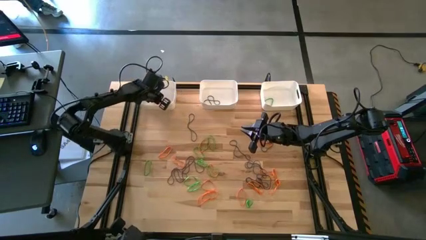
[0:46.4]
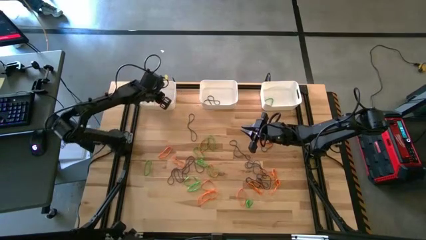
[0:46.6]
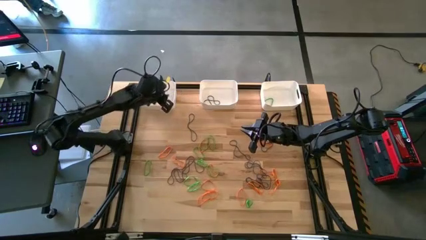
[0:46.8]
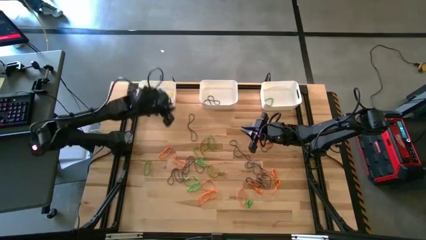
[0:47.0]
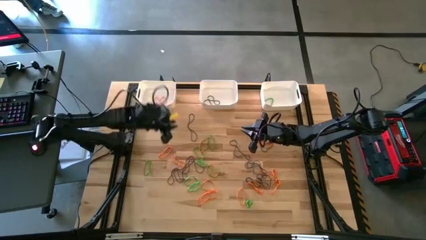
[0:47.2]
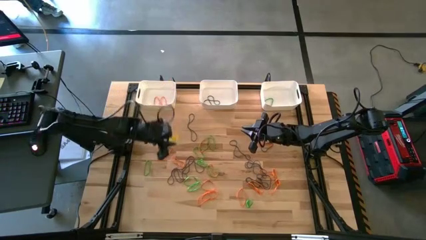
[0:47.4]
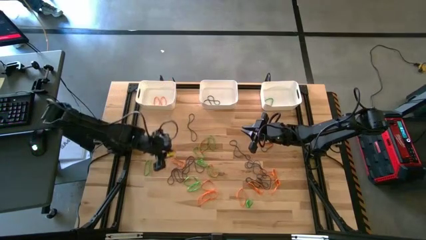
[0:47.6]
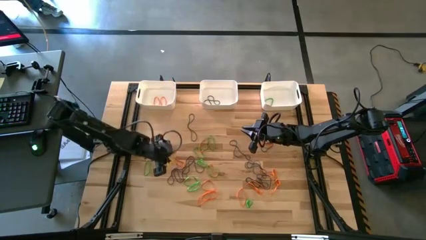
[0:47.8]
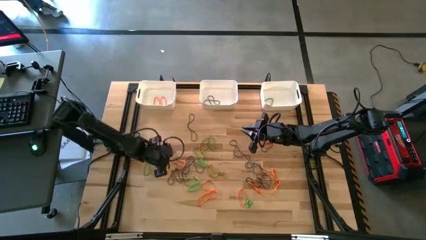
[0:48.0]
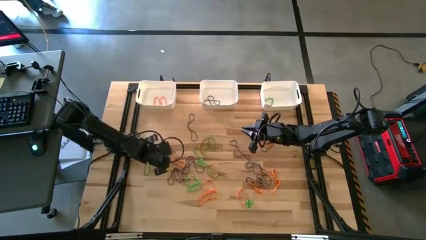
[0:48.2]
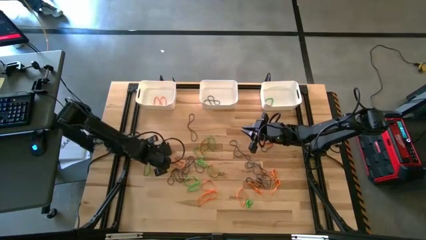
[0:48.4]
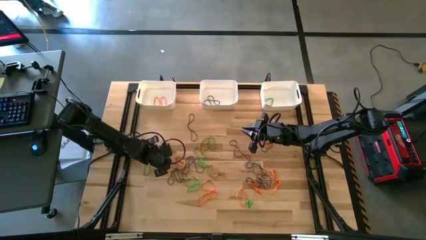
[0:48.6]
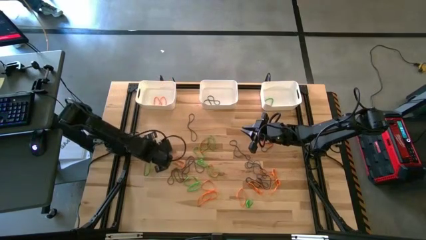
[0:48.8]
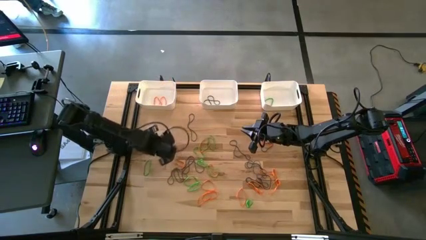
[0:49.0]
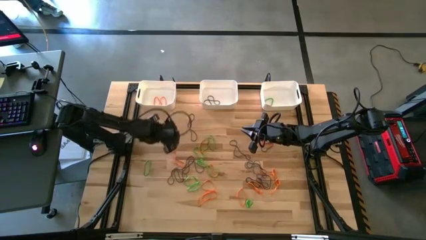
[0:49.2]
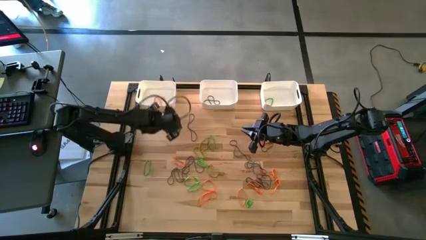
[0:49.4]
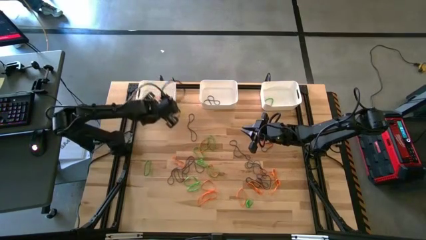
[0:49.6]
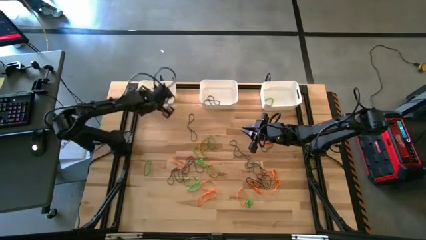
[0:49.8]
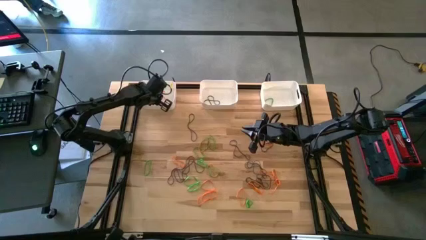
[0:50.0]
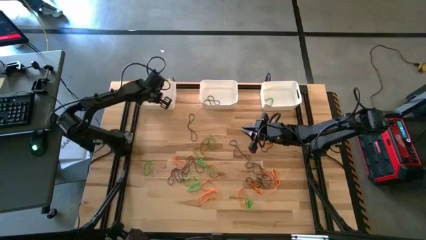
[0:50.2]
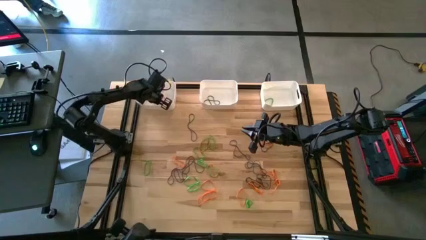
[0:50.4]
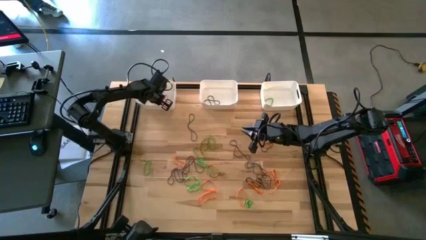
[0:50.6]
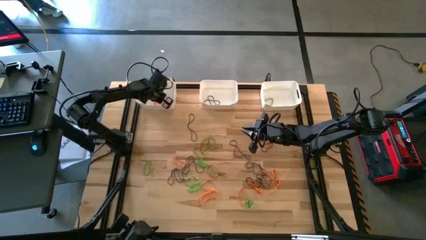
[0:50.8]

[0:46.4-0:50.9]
Task: Sort rubber bands into baskets
Put the orange rubber band into the left white bin

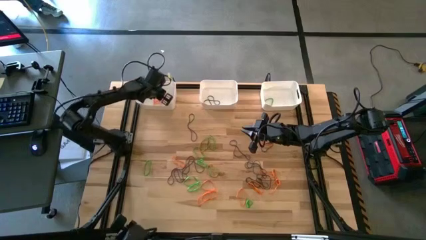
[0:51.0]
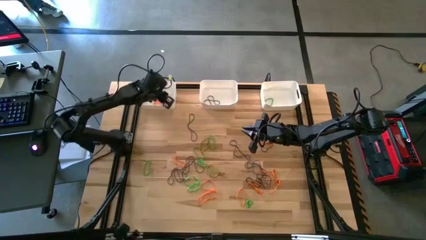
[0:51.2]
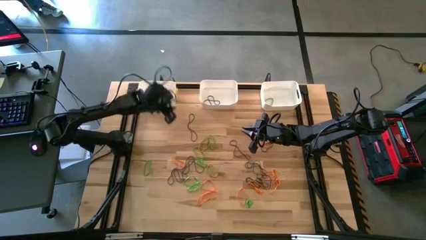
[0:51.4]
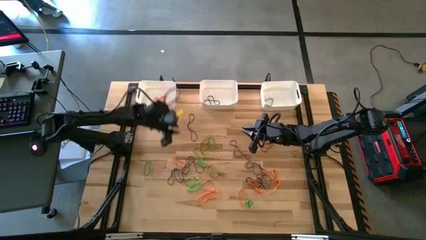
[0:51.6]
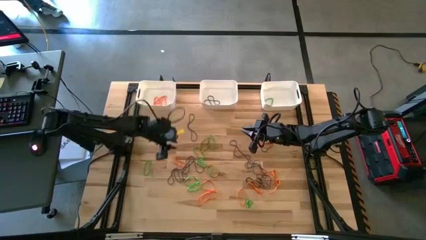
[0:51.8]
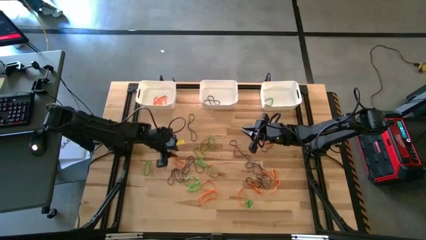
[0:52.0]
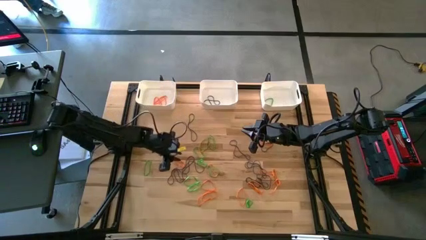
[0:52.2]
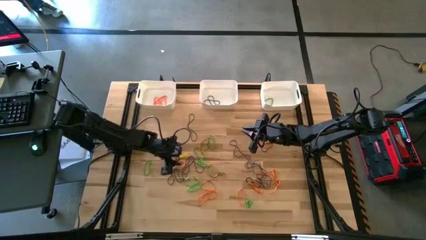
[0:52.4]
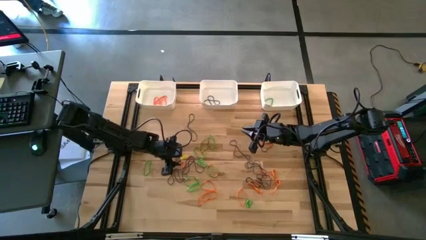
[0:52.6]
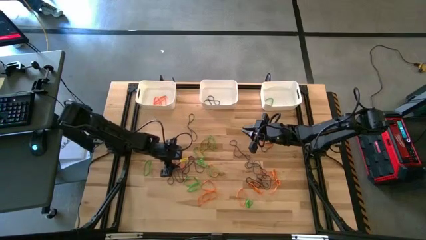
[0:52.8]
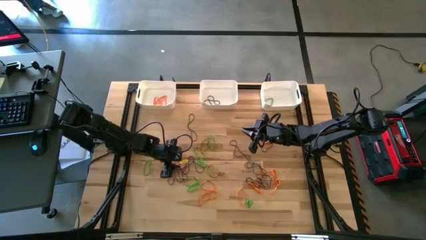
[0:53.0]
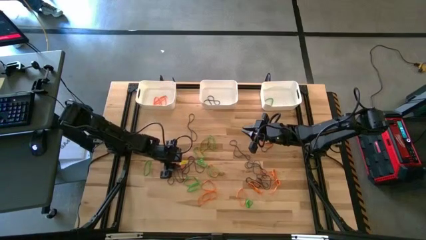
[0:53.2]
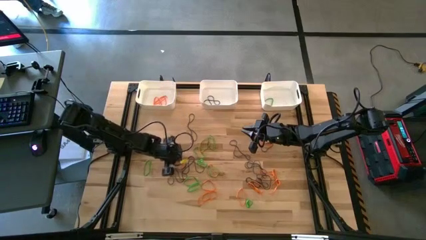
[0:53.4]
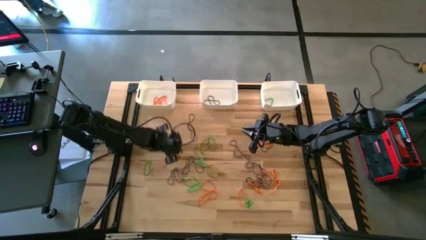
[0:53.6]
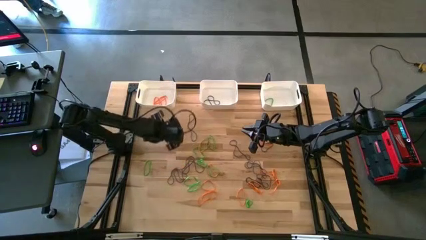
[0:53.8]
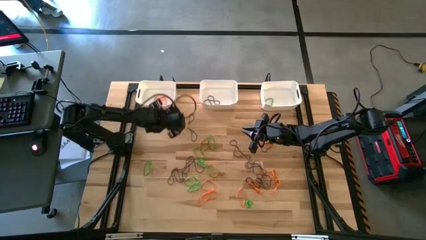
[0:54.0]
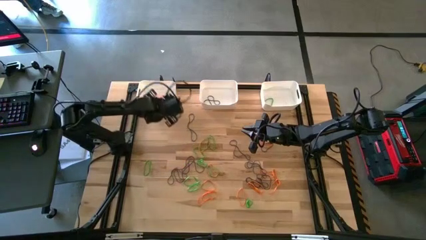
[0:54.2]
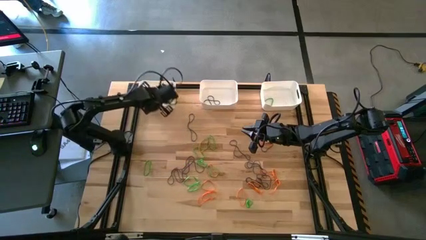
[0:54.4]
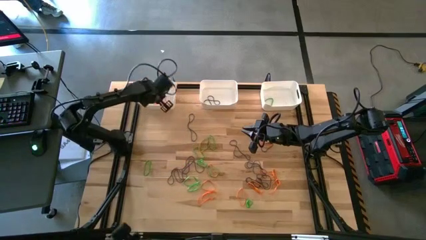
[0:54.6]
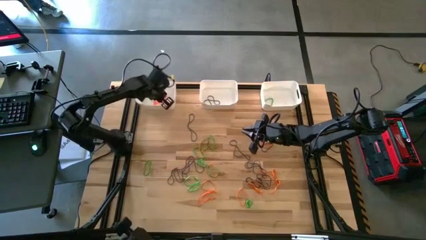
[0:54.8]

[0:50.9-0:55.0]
Put the orange rubber band into the left white bin

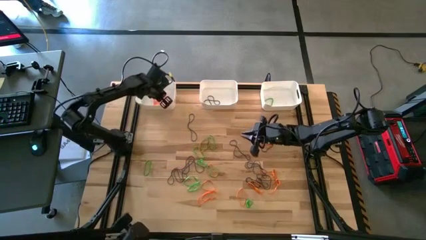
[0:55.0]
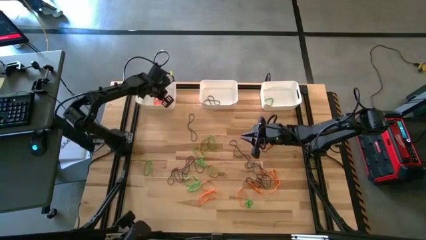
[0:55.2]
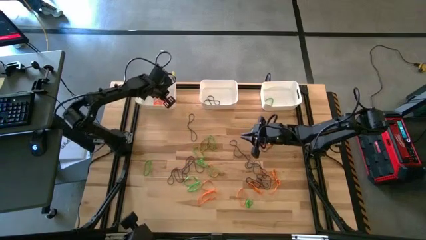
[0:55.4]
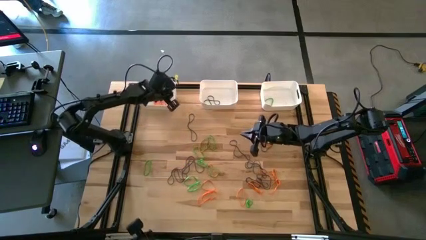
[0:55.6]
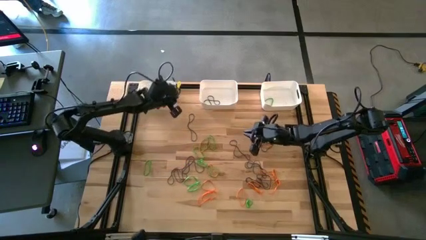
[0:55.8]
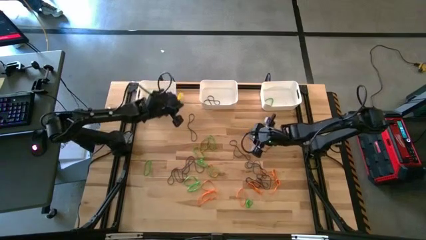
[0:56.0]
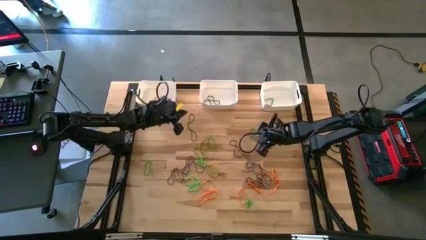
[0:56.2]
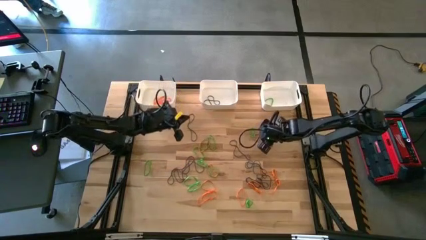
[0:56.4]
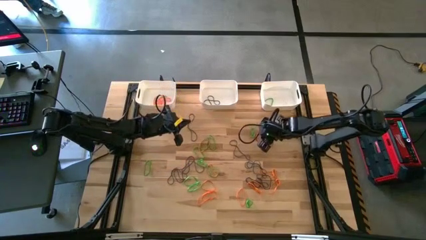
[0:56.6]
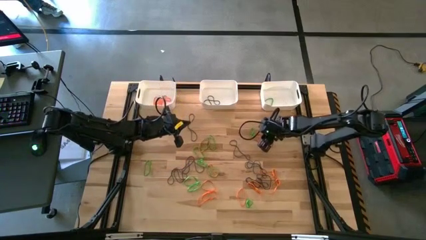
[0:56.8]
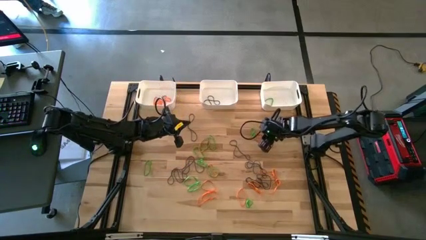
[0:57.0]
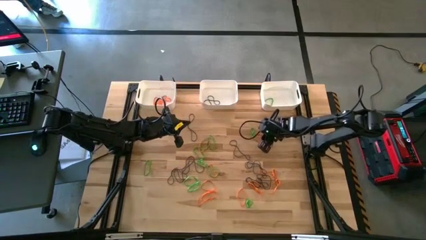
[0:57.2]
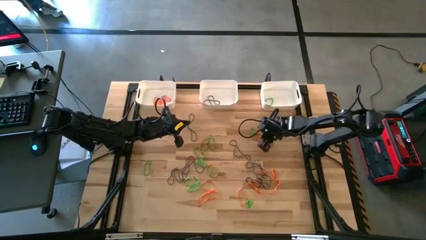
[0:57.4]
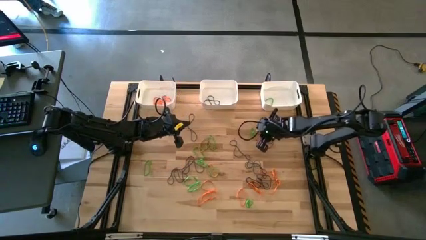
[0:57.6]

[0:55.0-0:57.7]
Put the orange rubber band into the left white bin

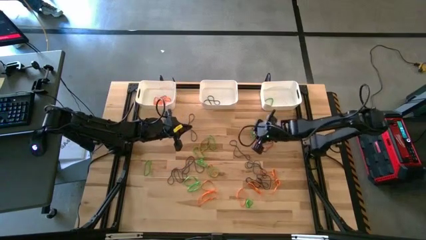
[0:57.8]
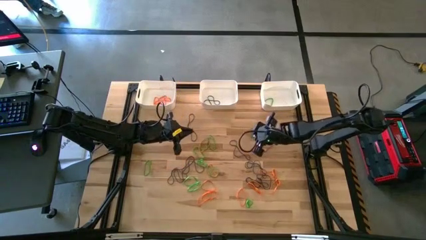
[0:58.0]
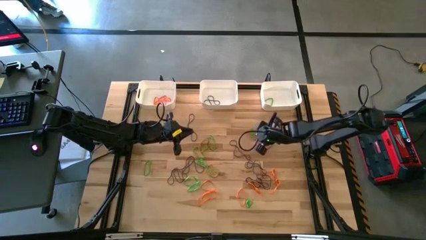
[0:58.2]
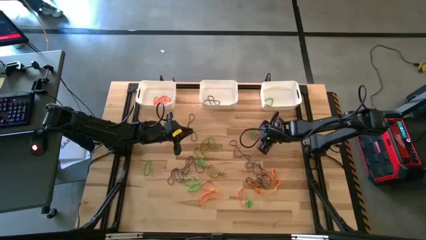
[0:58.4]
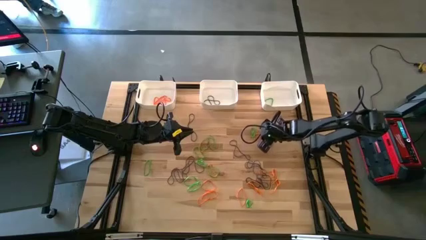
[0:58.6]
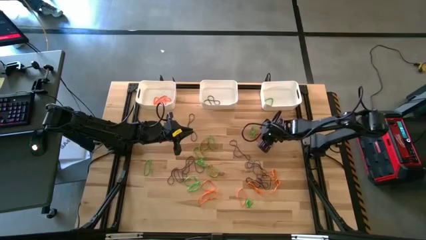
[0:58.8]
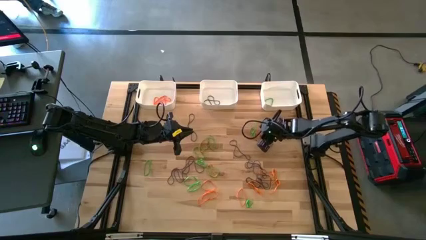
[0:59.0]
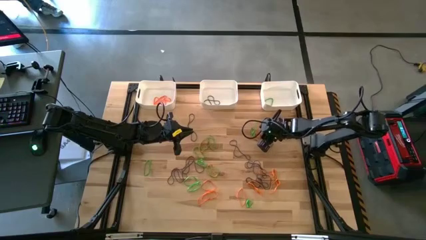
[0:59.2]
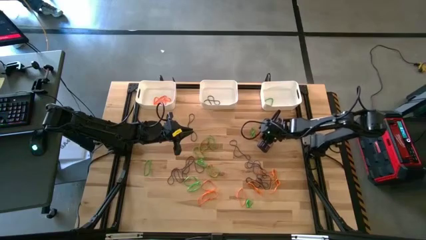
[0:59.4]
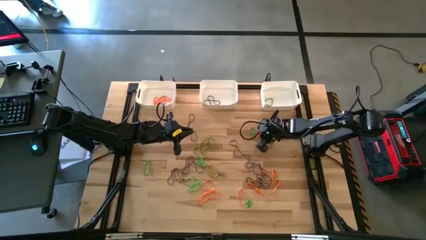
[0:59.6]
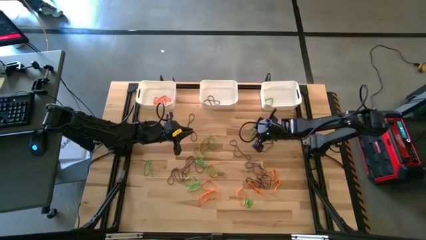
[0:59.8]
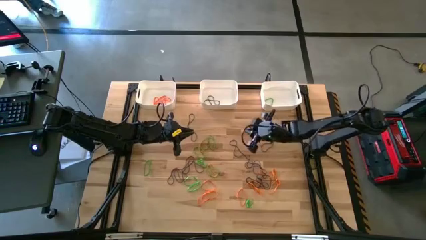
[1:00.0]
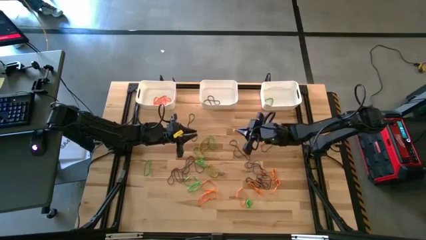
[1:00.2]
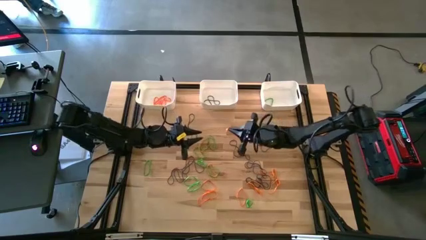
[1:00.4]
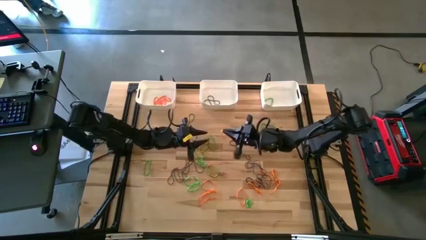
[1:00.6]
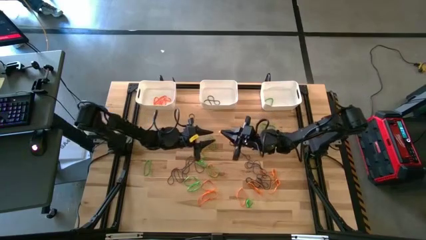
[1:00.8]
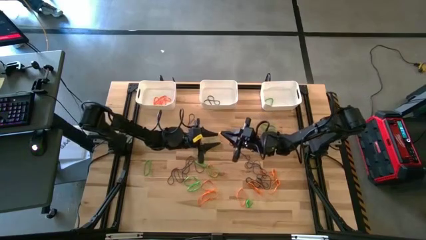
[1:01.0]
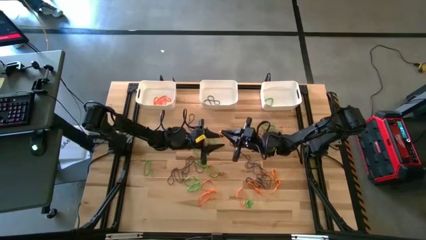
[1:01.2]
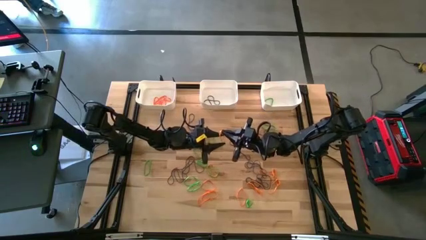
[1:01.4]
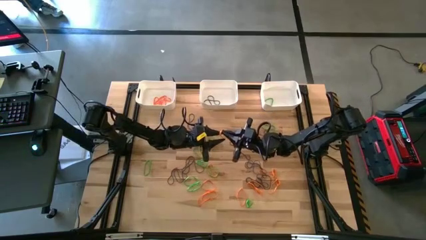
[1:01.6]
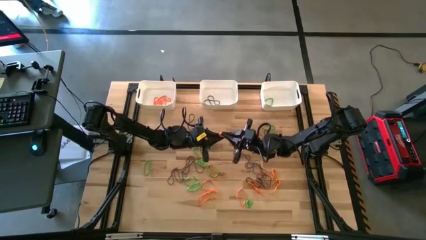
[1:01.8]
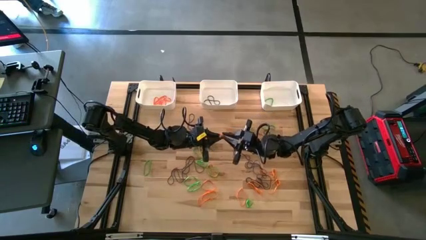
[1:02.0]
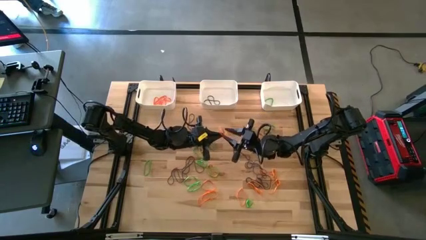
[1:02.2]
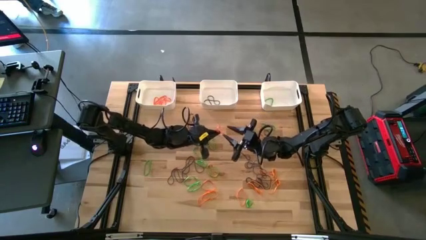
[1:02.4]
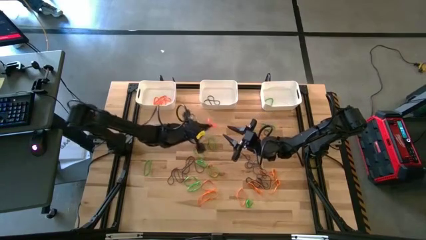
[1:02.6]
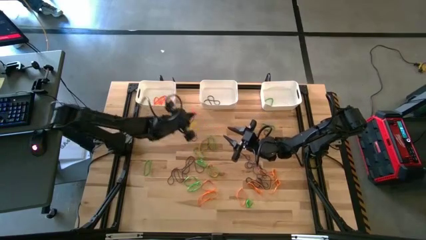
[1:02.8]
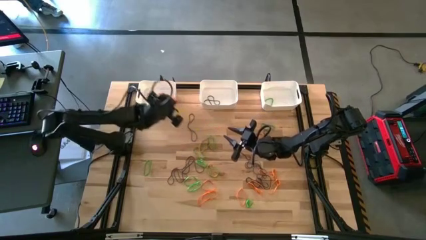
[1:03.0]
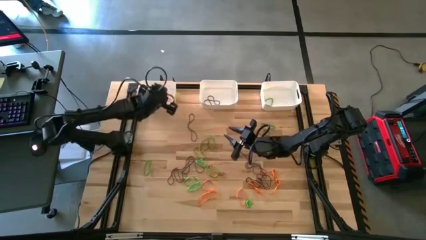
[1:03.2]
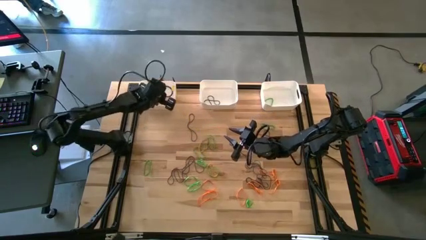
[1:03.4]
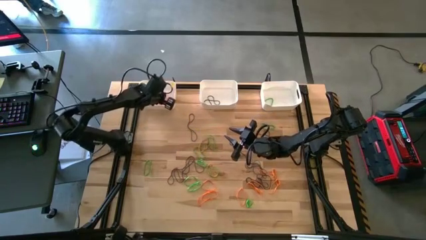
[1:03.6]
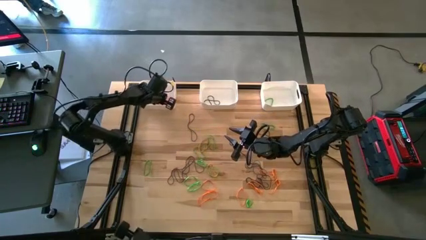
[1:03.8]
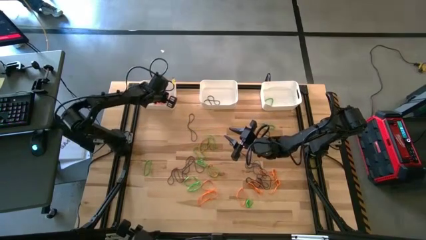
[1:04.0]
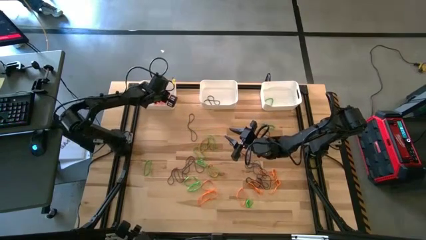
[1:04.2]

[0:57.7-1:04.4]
Put the orange rubber band into the left white bin
